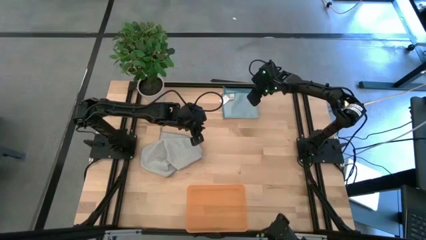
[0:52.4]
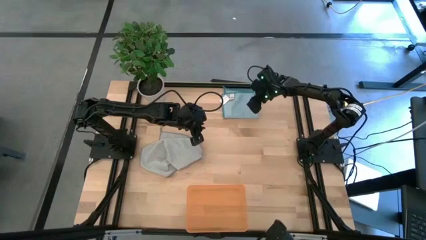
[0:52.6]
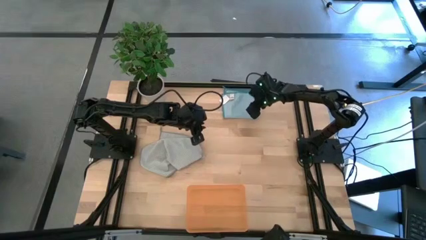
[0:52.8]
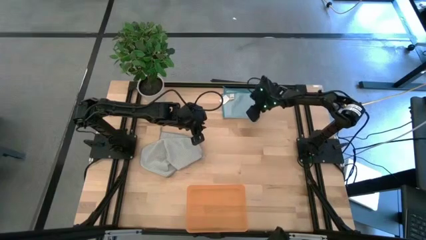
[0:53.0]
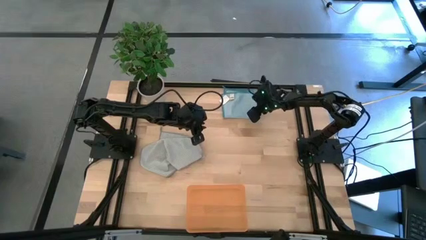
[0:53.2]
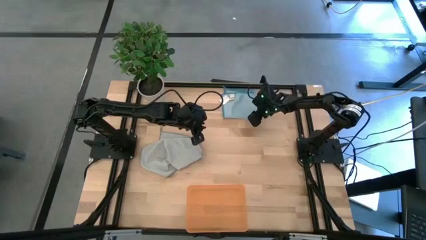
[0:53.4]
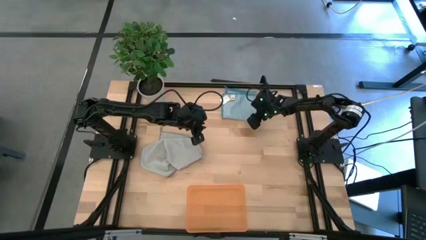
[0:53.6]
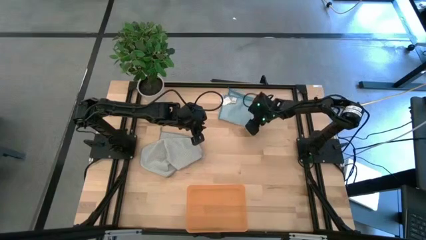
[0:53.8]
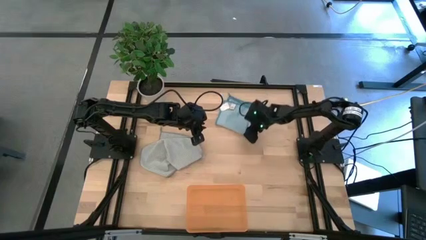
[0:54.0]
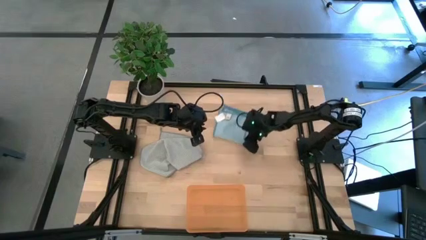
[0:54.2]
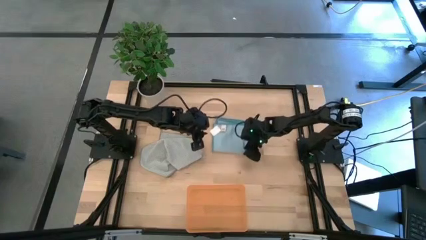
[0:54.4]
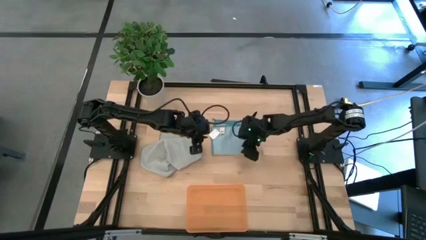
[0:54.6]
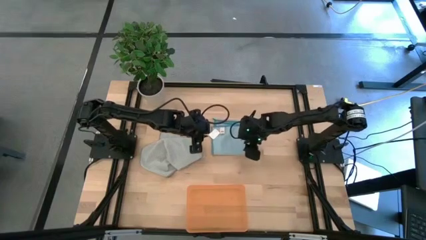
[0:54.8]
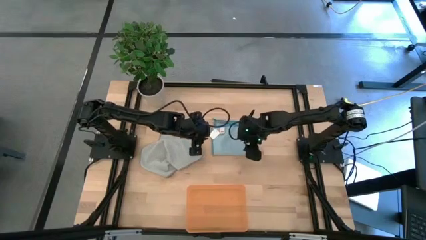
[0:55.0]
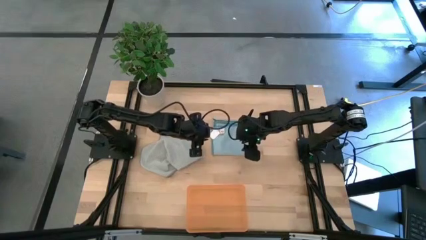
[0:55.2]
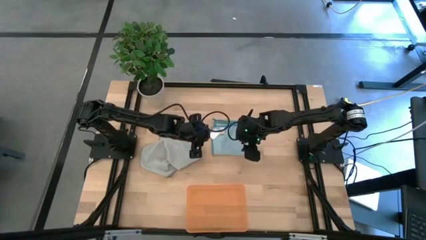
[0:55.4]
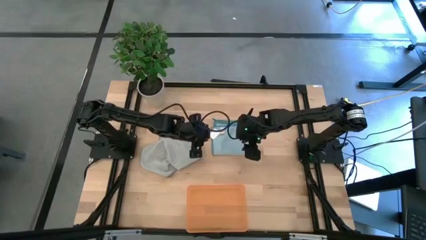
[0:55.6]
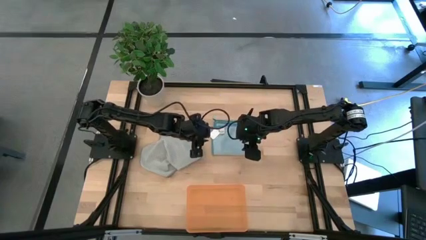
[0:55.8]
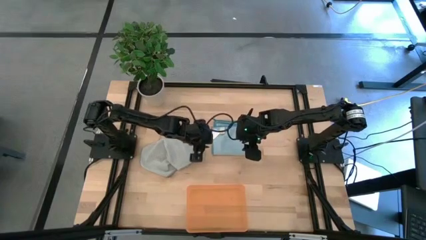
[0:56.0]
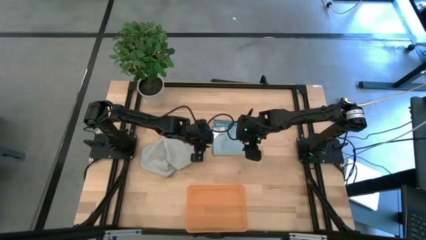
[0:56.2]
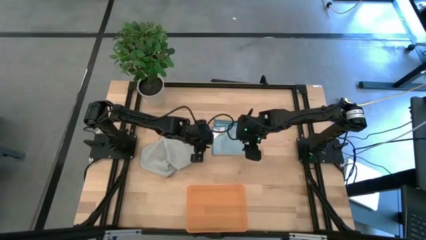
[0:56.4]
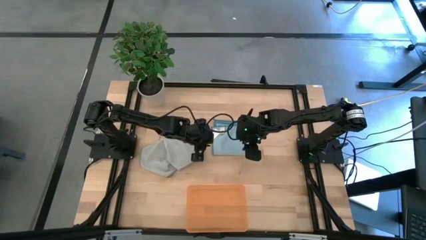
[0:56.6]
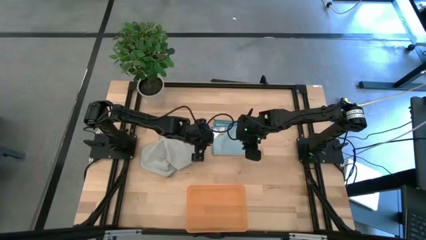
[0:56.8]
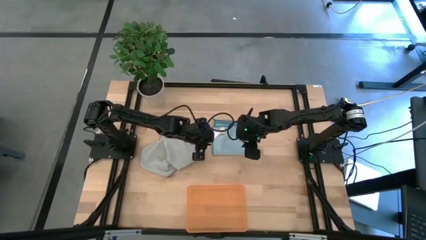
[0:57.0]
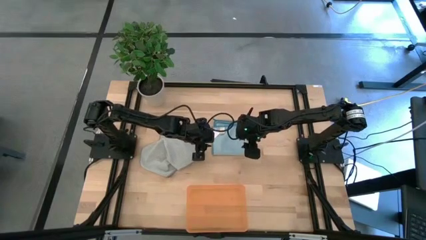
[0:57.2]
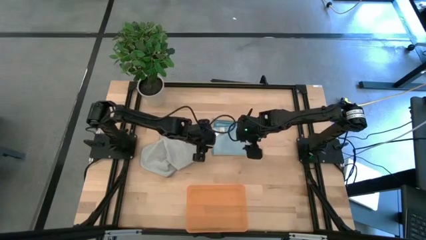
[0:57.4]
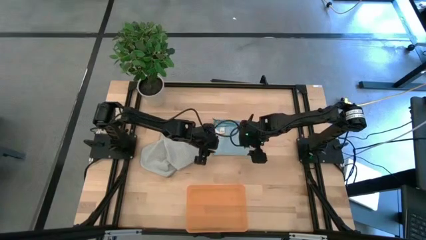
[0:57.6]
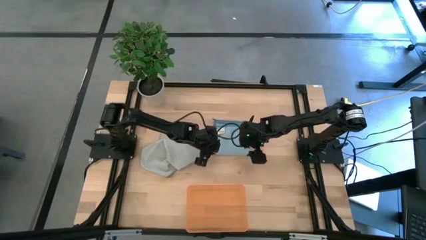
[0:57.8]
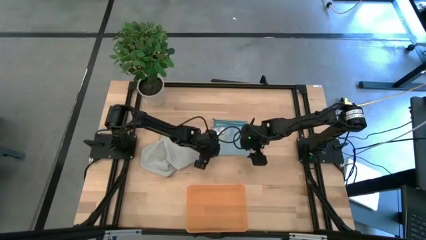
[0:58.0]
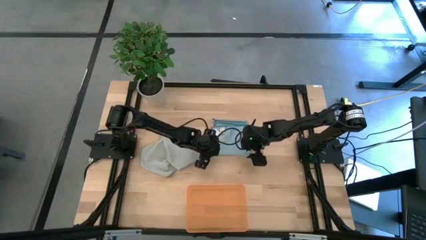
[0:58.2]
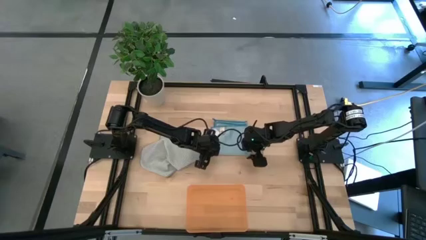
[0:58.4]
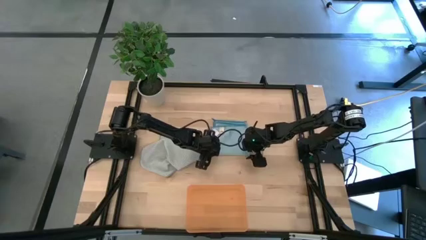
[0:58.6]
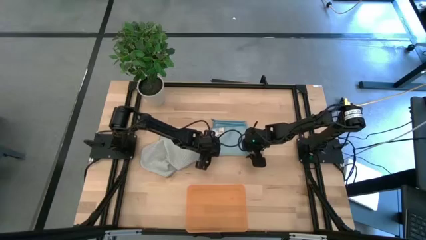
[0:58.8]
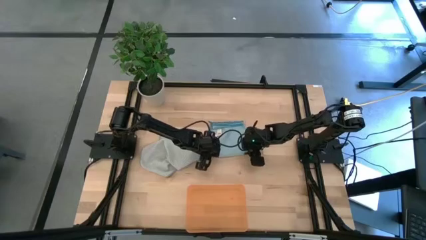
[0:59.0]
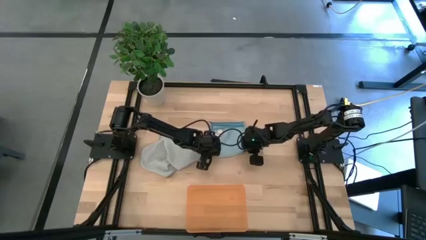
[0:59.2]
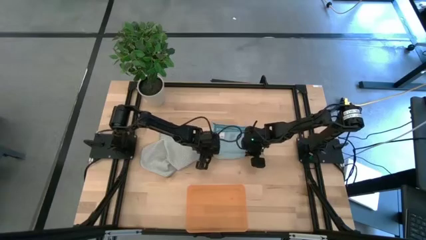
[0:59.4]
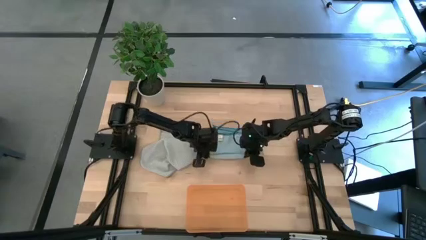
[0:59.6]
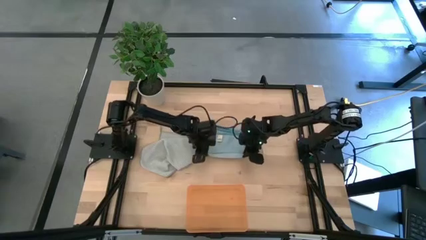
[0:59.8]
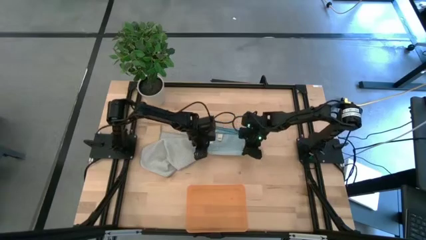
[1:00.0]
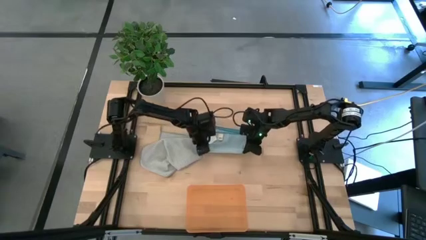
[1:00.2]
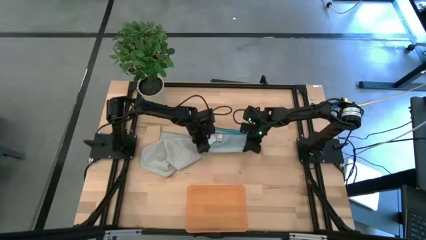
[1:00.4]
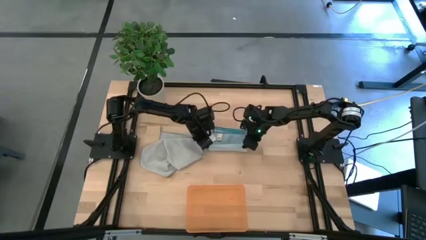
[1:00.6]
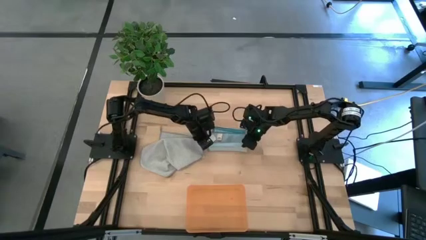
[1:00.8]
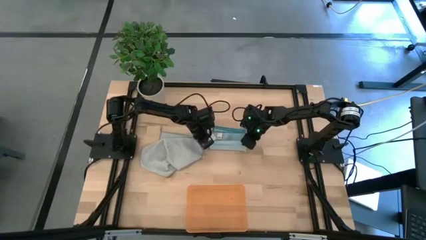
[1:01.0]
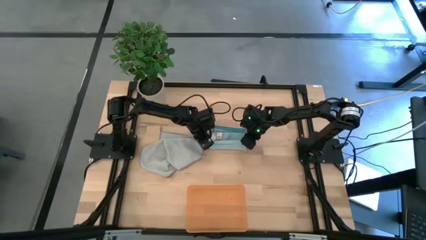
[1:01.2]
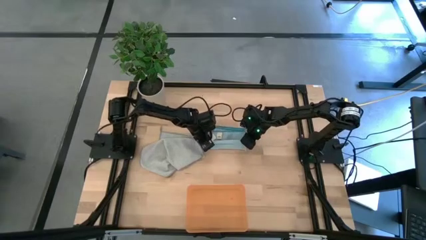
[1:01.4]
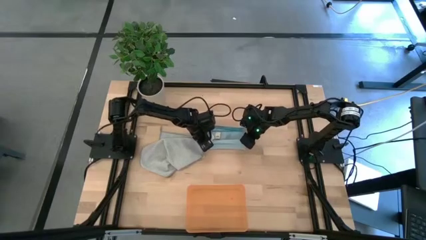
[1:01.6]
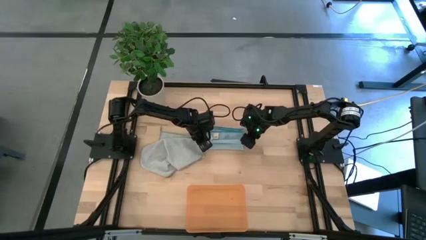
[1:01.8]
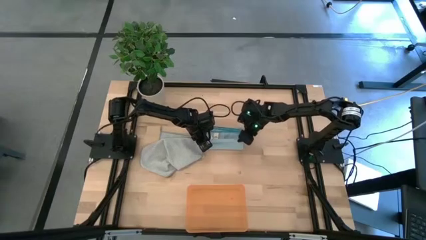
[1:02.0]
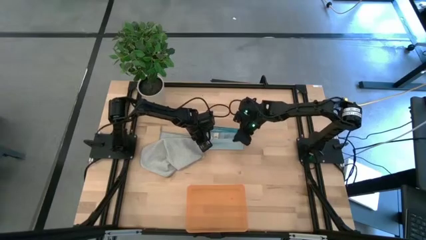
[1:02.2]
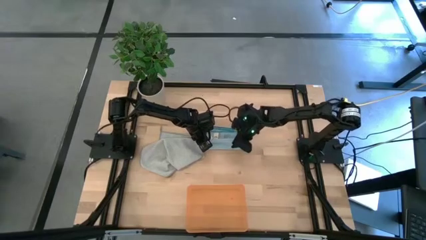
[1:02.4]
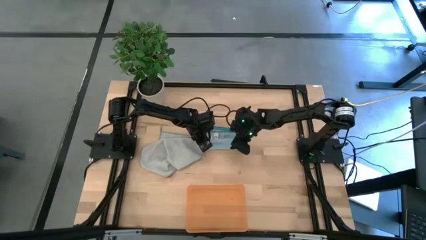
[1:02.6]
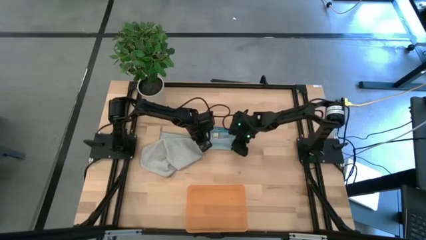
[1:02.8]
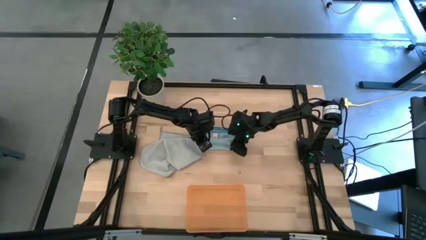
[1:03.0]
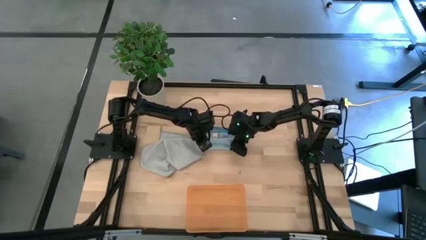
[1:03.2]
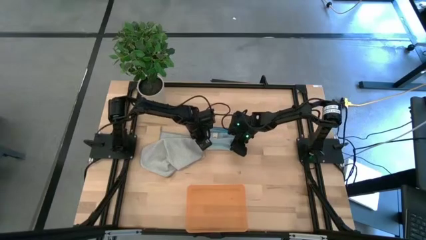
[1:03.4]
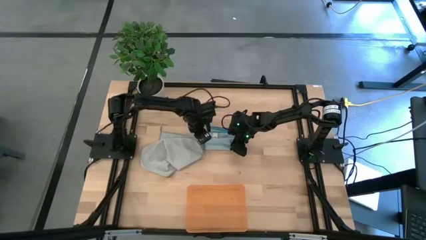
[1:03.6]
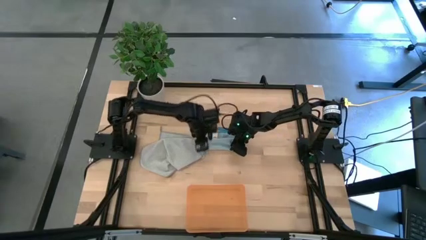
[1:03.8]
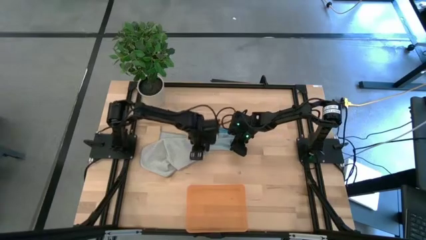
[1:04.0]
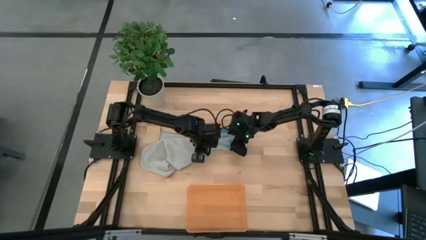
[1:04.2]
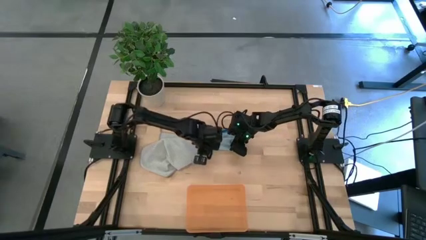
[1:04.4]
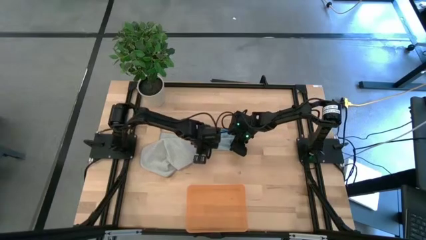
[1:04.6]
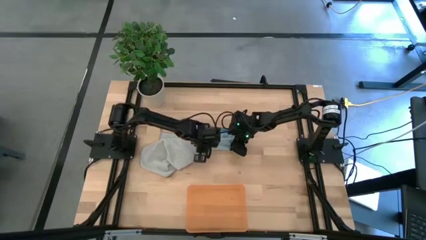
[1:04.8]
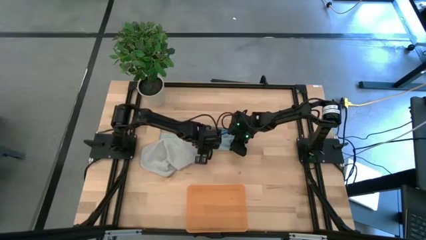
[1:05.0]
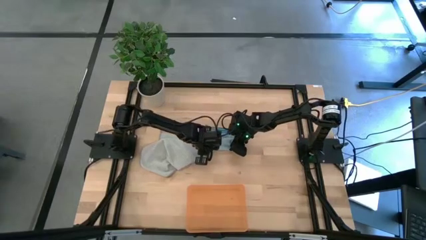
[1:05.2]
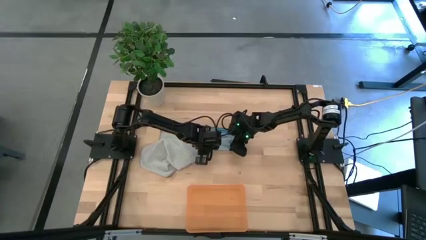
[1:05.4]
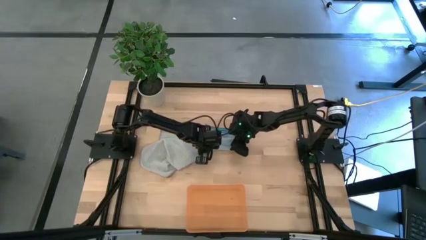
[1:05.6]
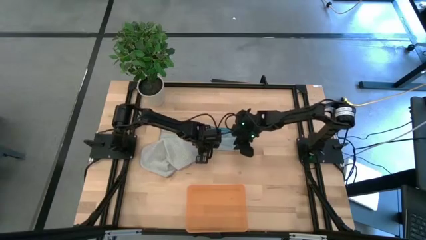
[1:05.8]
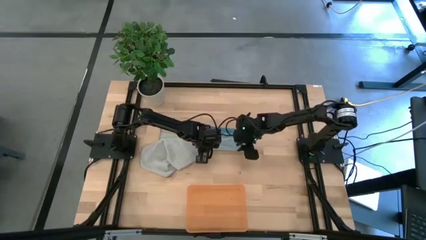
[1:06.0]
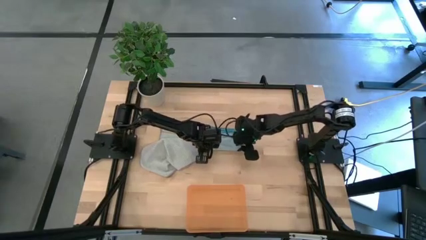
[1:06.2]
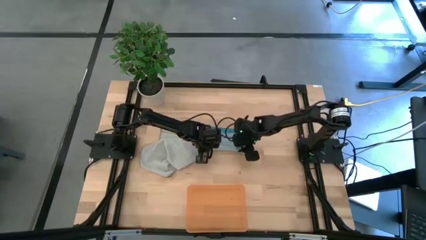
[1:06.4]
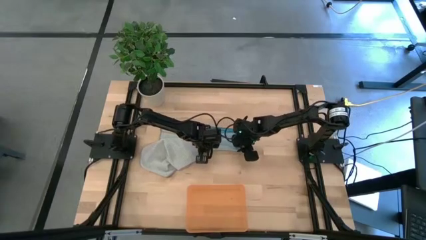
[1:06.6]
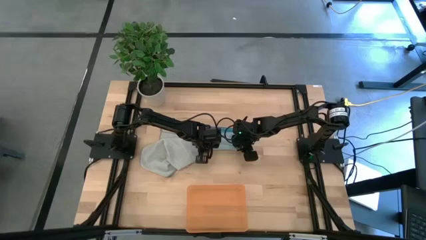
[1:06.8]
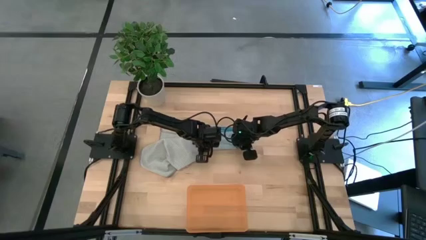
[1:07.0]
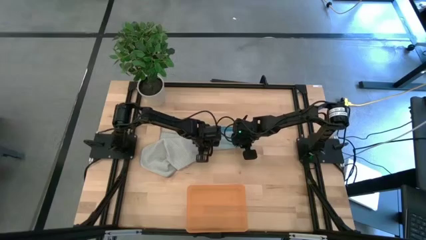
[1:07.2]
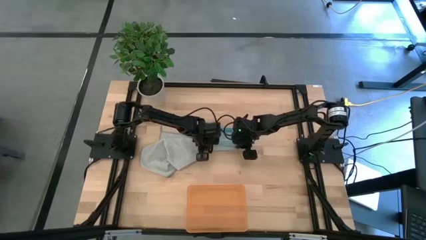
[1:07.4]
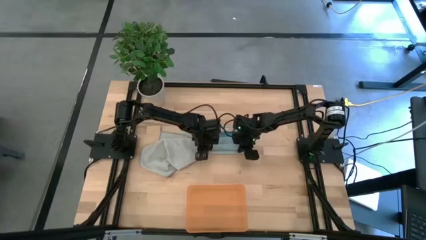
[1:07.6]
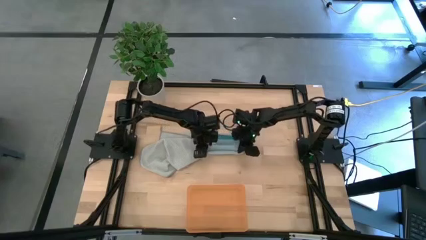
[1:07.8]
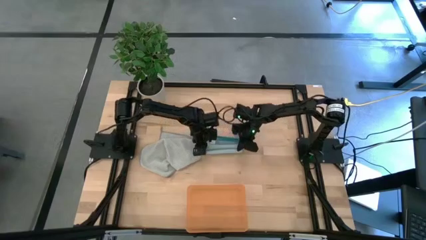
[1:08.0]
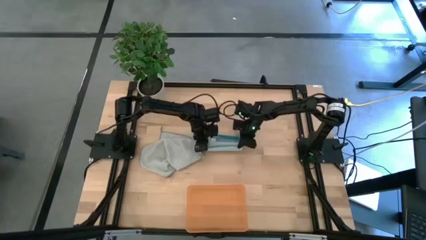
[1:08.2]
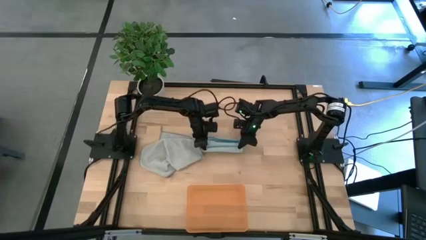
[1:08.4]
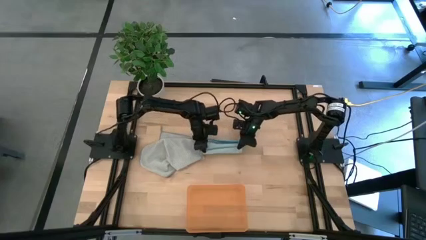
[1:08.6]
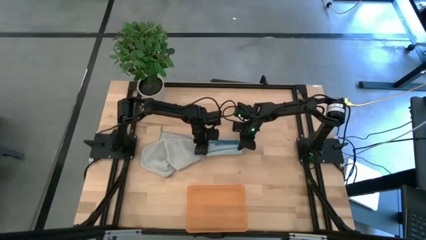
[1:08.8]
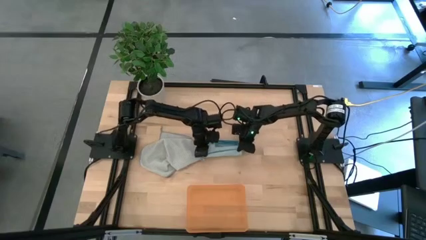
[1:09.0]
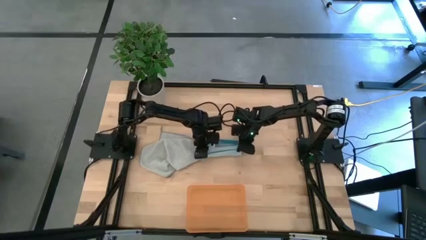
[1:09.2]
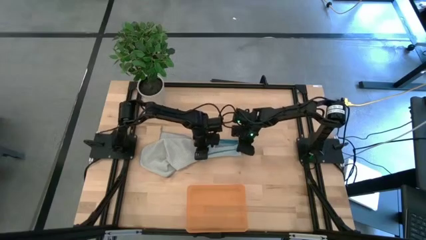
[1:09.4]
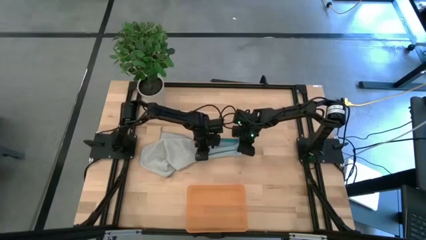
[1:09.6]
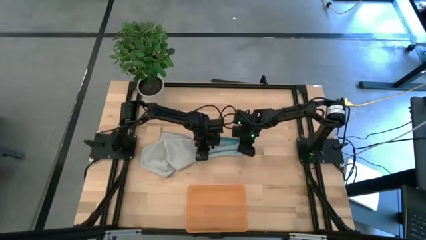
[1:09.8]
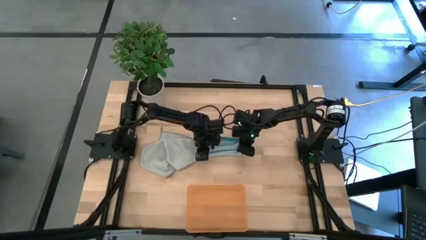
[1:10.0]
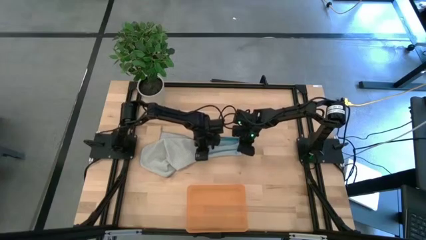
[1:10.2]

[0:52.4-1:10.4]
Task: Roll microfiber towels into tight, uniform cylinder then place into a basket
Roll the blue towel
